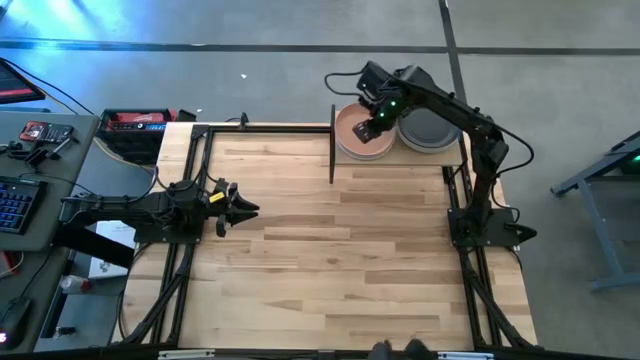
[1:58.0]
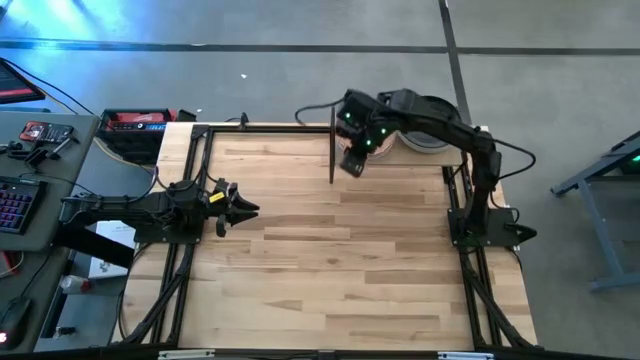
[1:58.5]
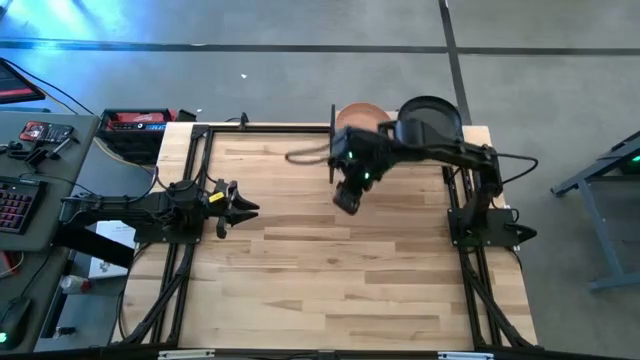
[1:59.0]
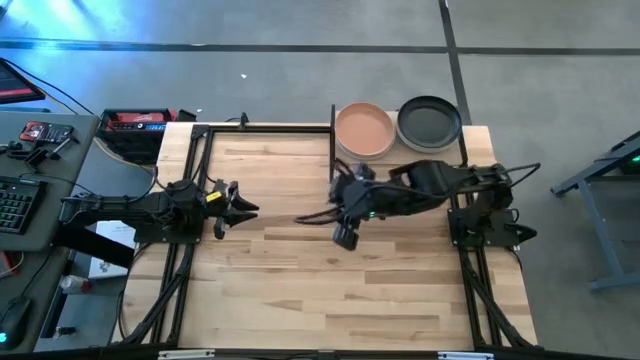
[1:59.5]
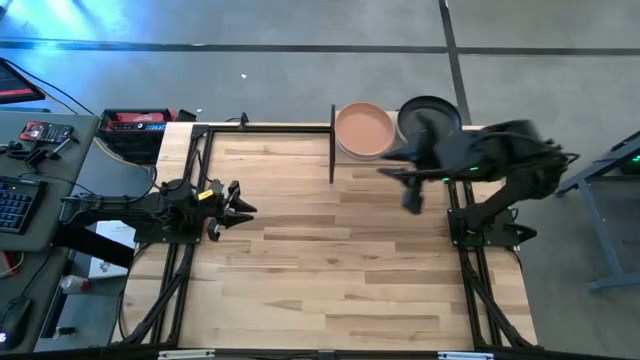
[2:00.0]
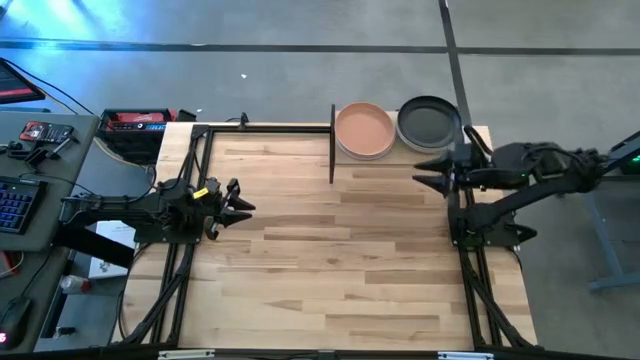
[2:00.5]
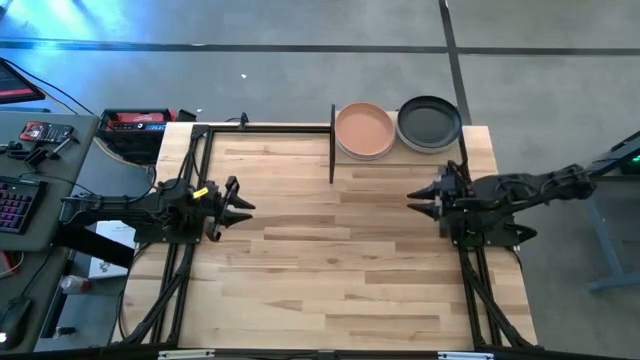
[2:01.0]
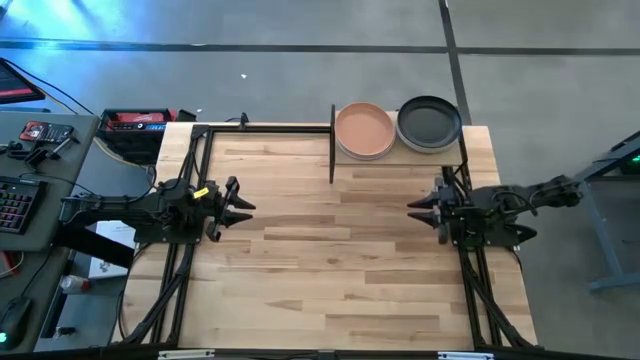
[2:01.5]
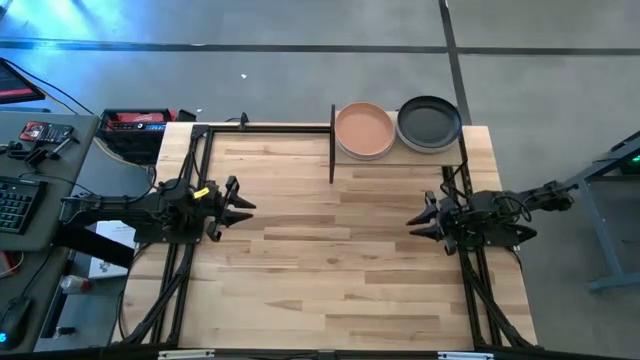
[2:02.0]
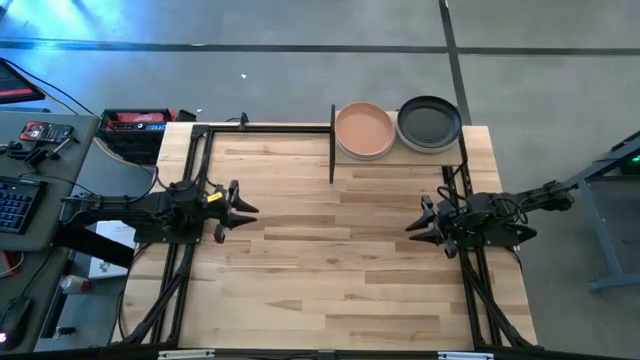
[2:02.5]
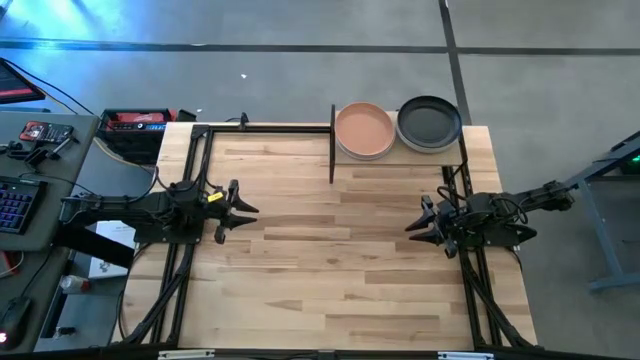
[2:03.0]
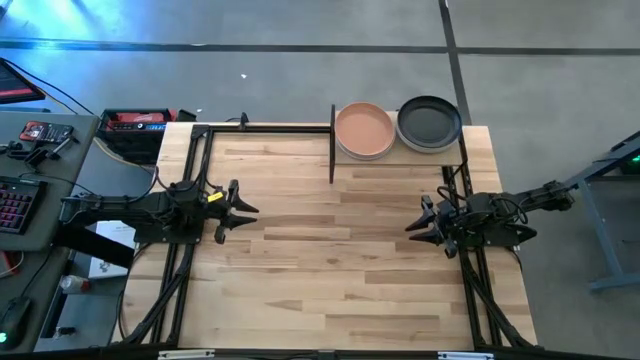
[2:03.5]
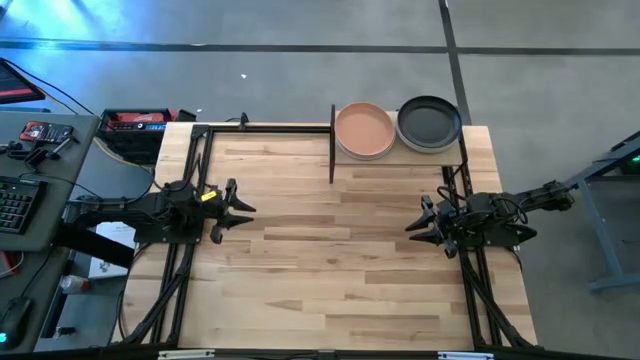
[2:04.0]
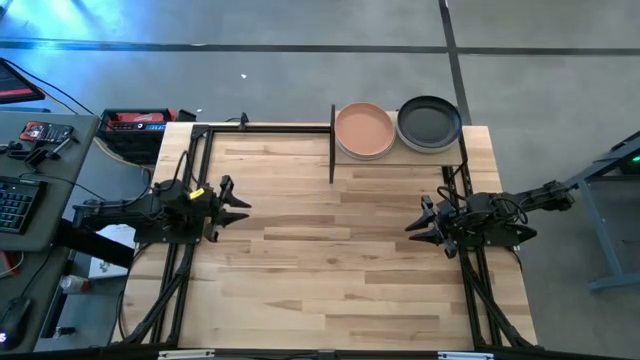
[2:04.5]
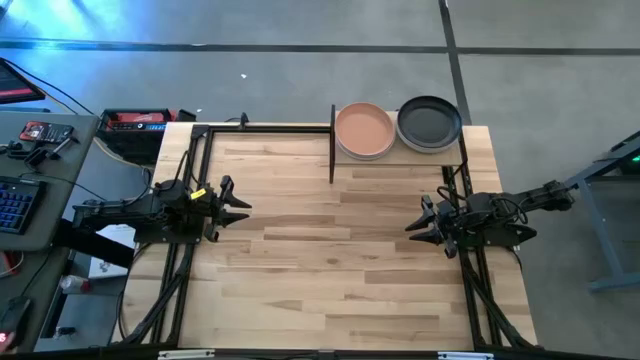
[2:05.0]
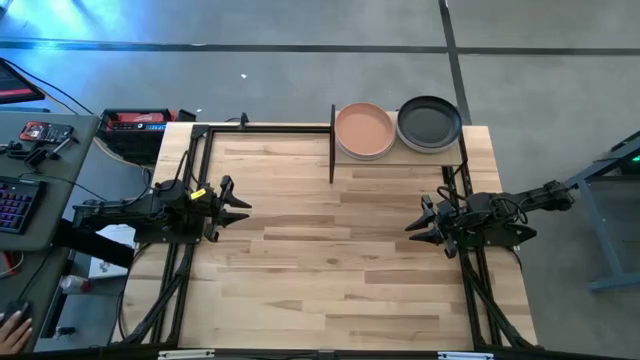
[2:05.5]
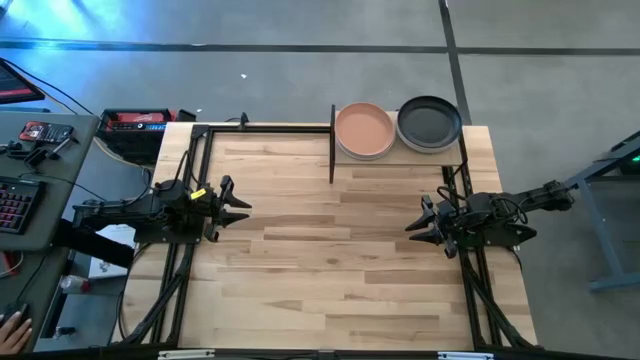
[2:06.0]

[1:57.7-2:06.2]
Task: Place and stack plates onto a shelf
Return to Home Position

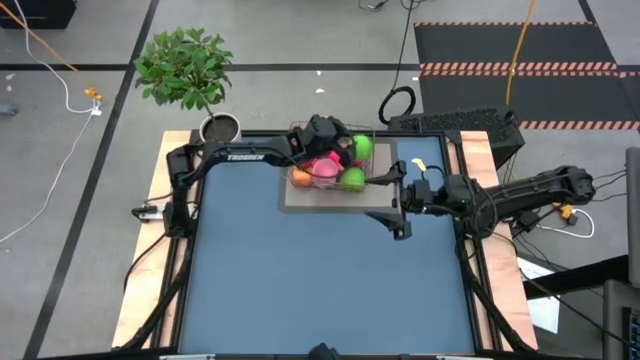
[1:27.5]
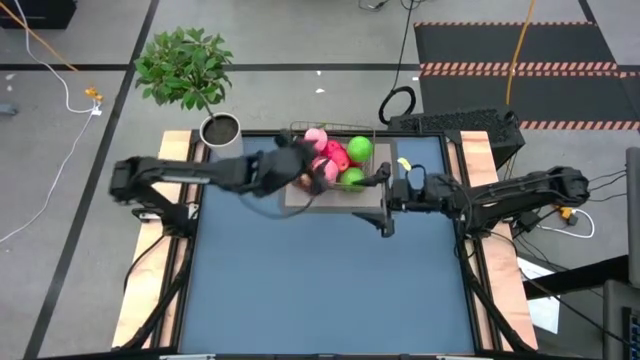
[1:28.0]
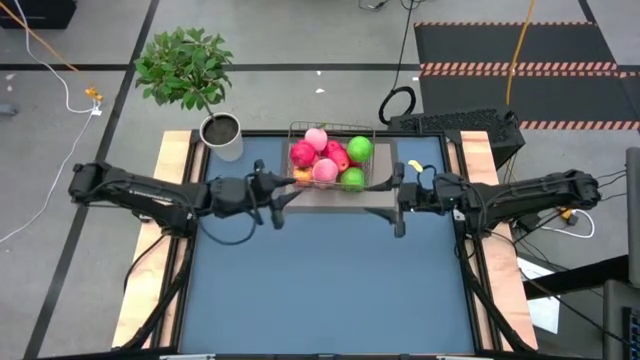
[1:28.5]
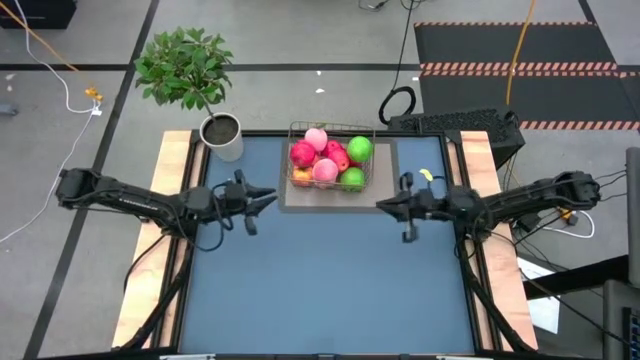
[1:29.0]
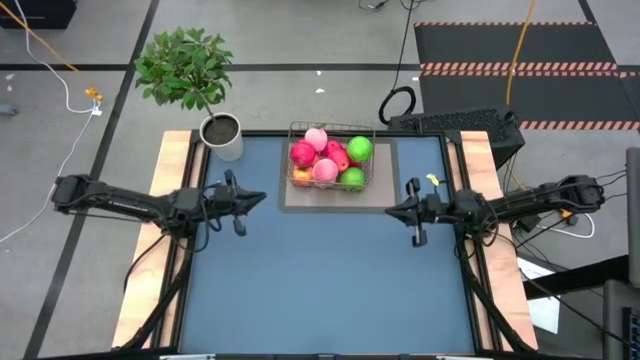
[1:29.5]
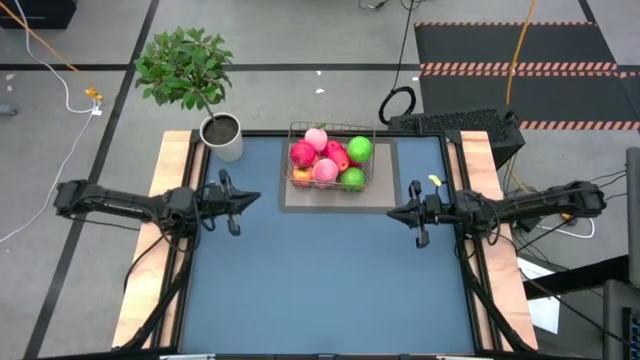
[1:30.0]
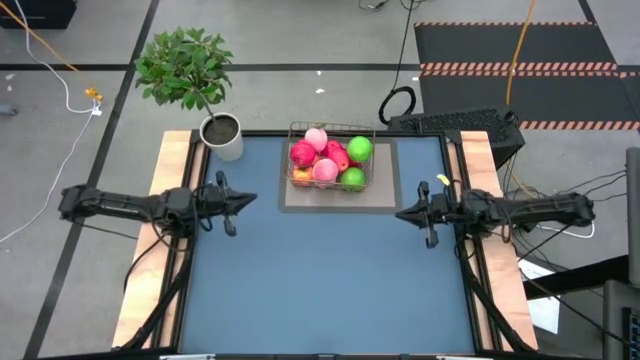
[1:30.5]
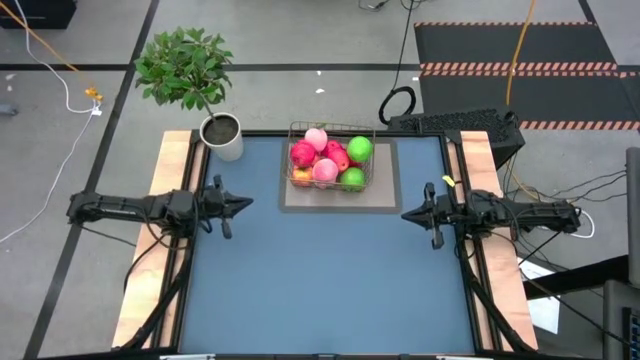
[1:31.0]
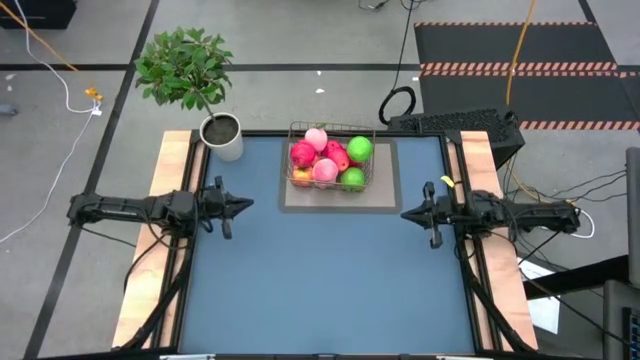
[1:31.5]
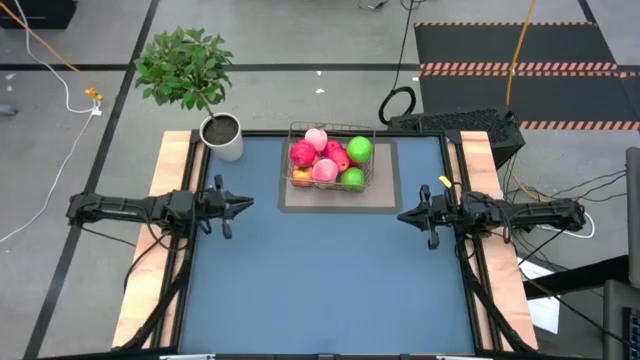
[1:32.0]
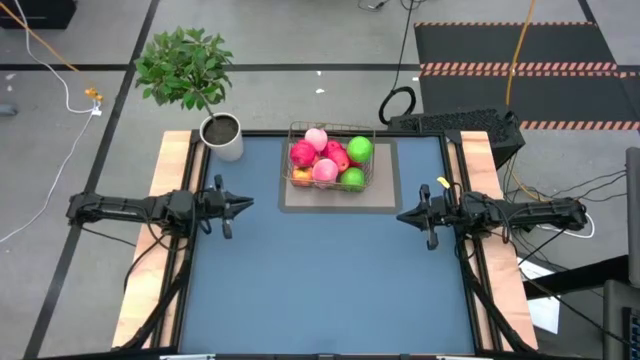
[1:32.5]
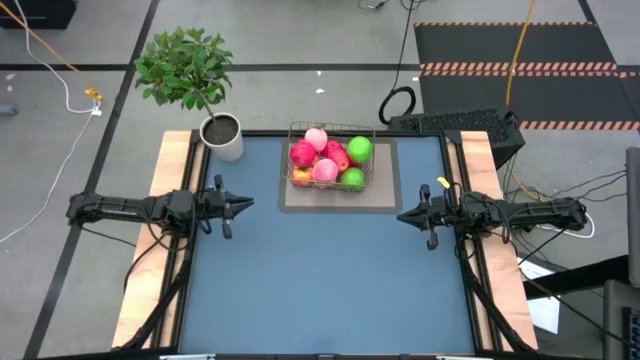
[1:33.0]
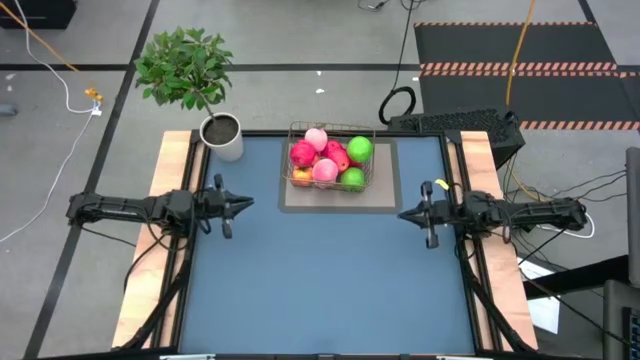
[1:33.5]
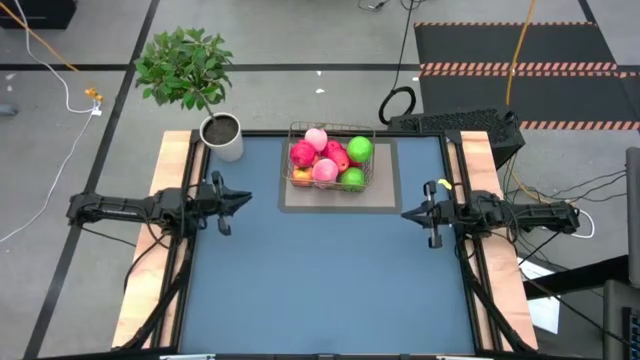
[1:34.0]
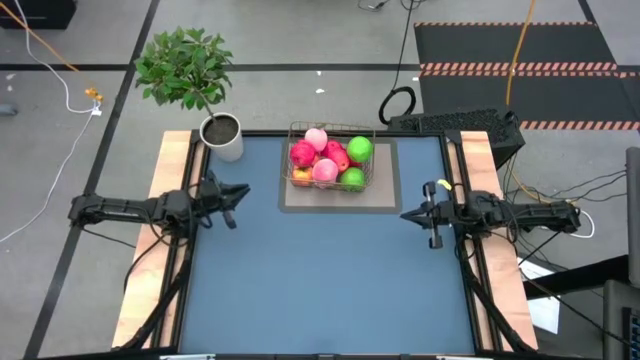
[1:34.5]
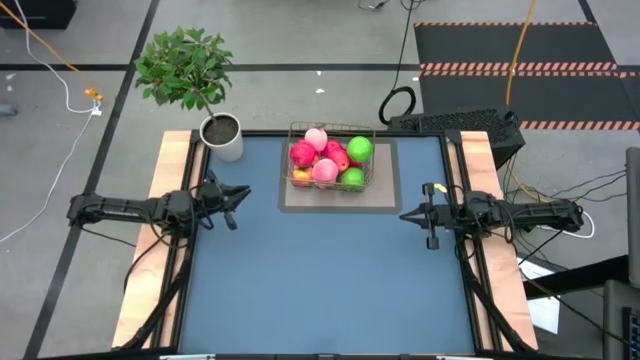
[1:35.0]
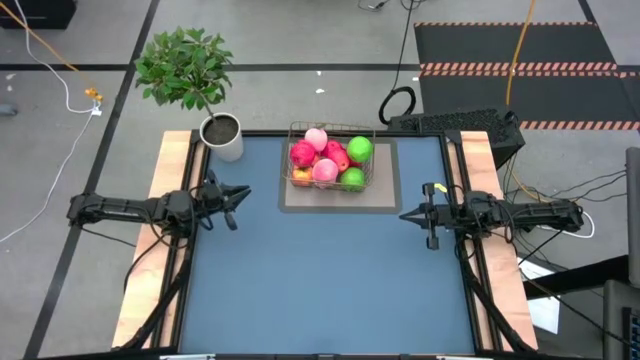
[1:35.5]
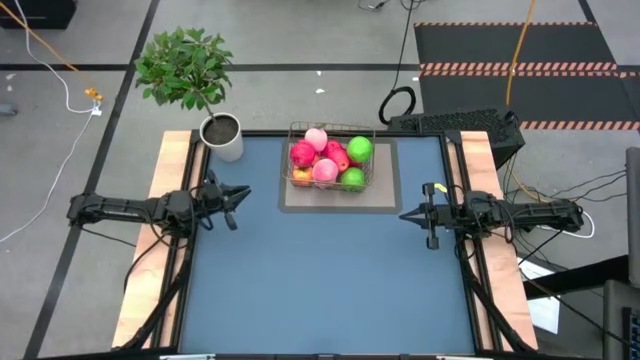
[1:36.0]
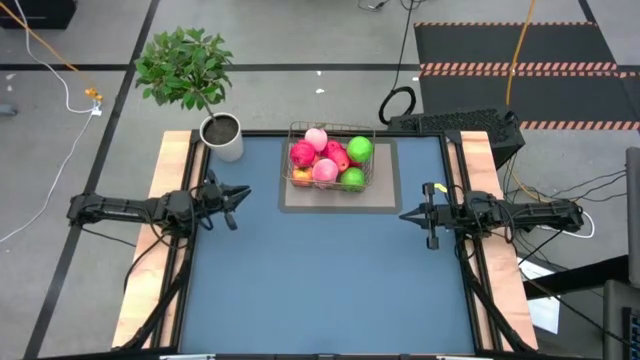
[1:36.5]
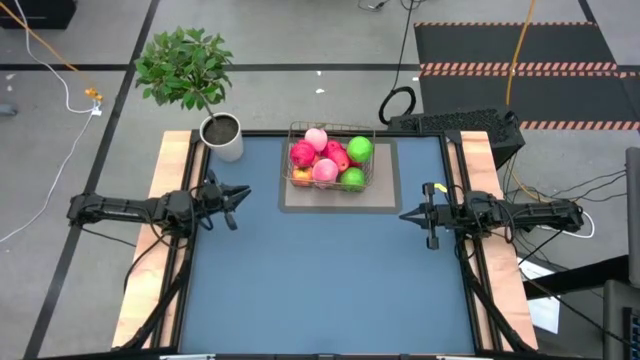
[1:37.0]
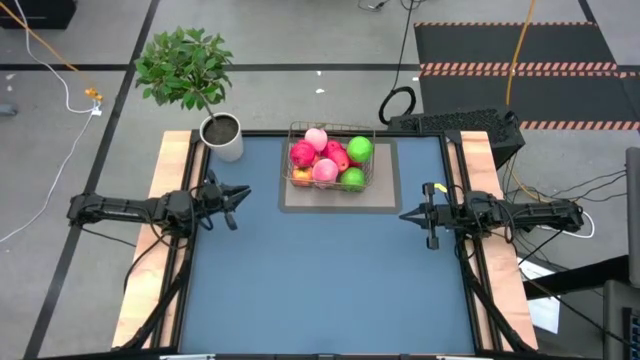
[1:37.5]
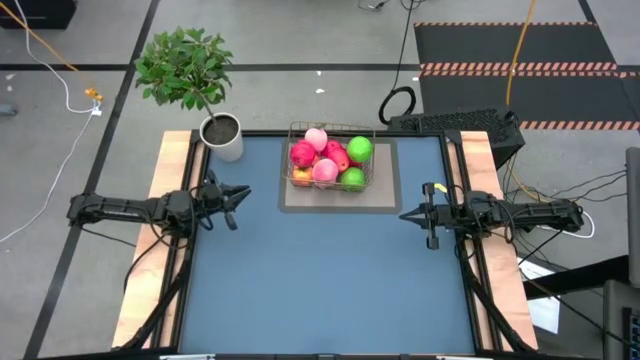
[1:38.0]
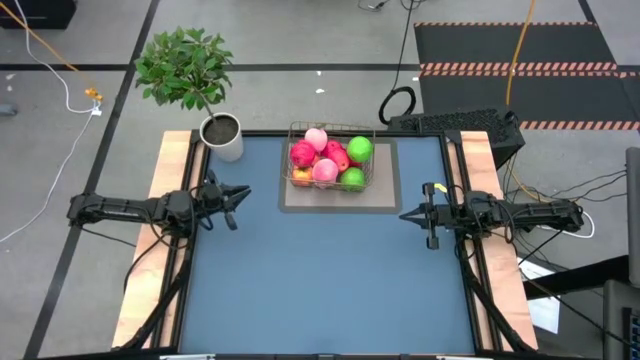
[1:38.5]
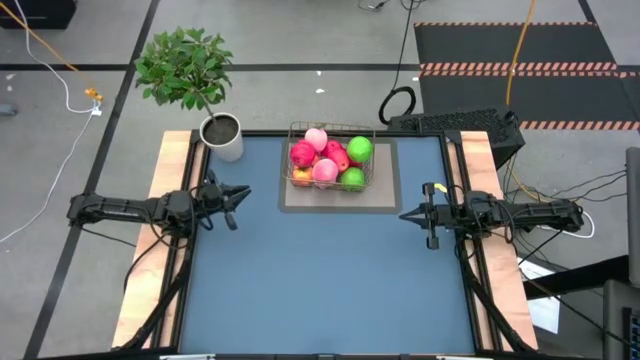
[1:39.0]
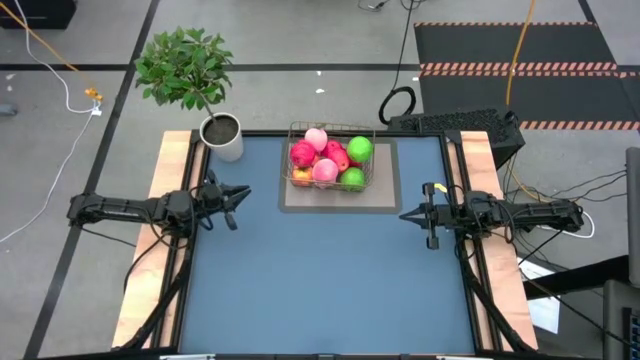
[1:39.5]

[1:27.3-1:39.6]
Task: Build produce basket
Return to Home Position
